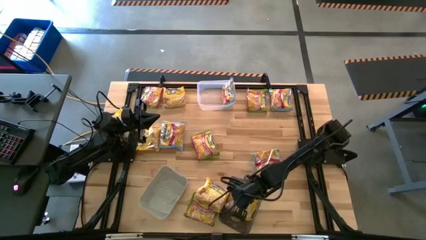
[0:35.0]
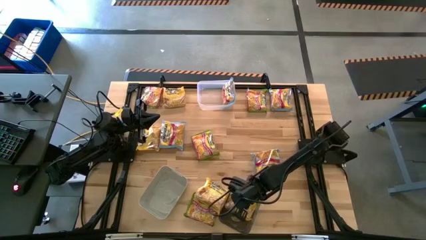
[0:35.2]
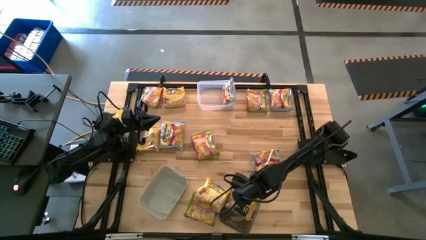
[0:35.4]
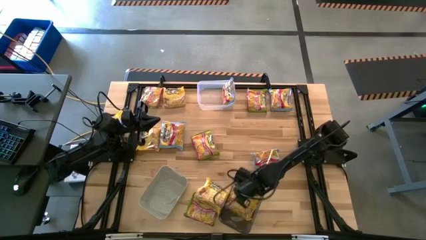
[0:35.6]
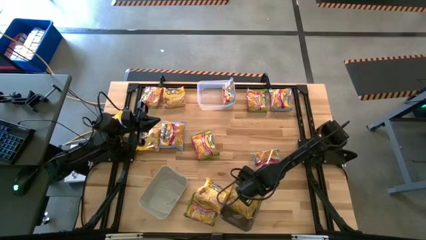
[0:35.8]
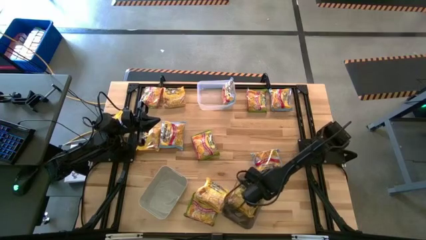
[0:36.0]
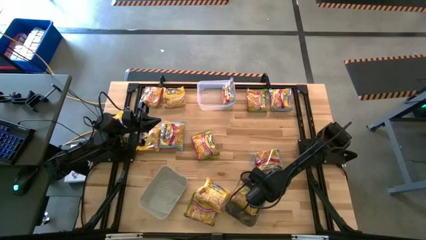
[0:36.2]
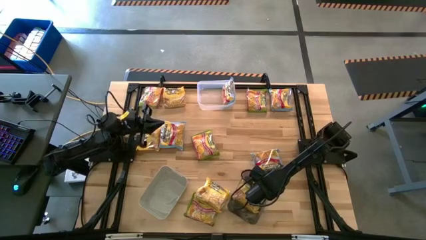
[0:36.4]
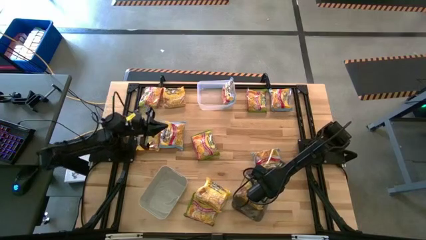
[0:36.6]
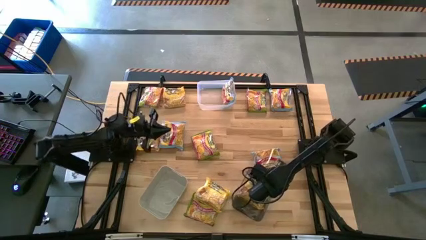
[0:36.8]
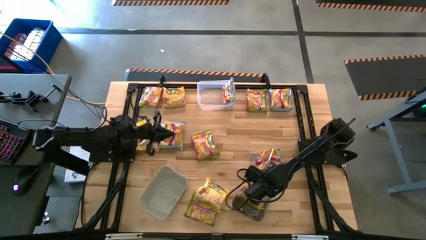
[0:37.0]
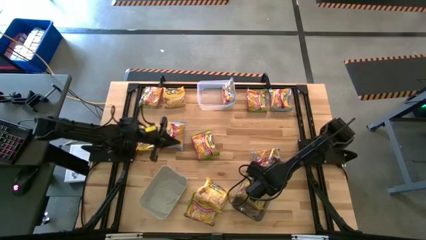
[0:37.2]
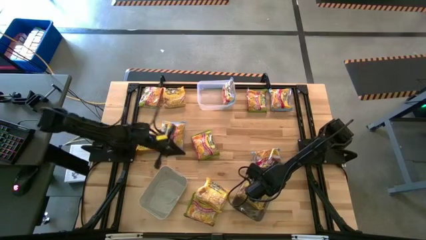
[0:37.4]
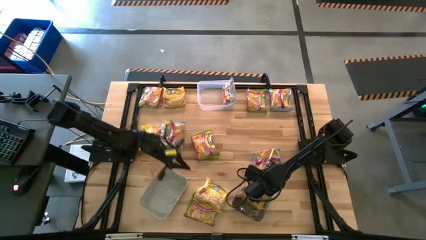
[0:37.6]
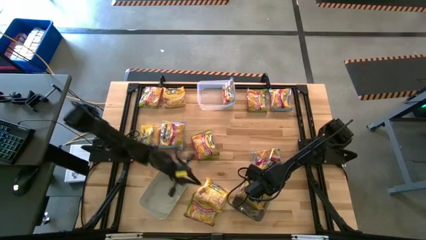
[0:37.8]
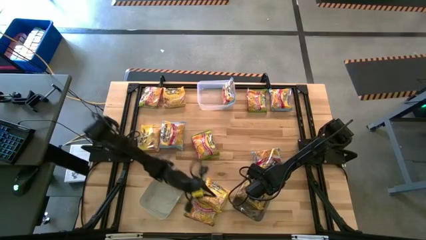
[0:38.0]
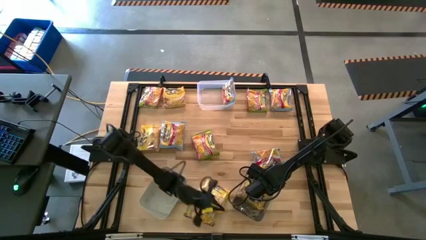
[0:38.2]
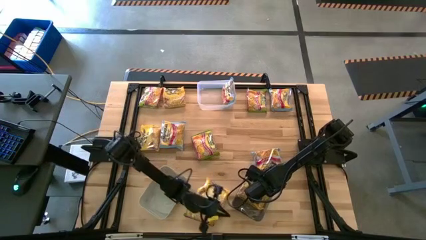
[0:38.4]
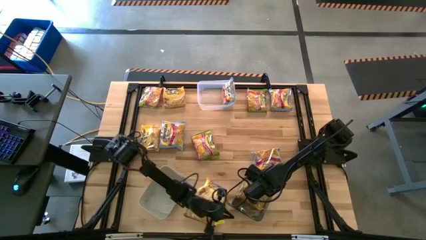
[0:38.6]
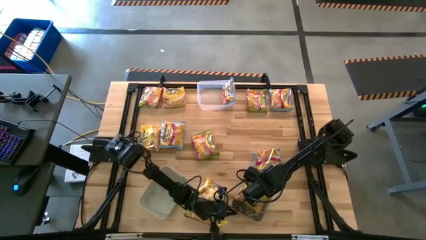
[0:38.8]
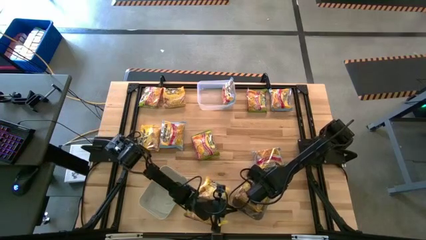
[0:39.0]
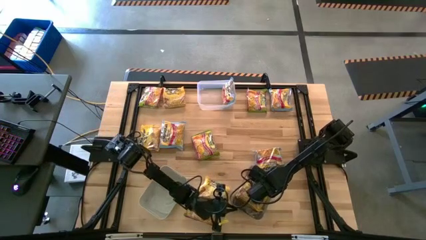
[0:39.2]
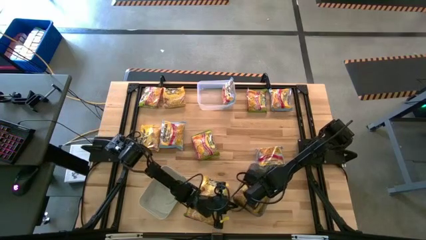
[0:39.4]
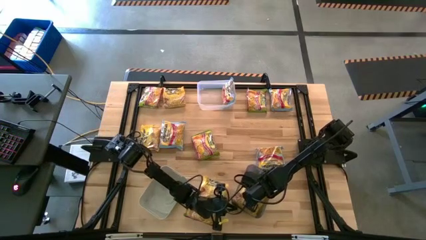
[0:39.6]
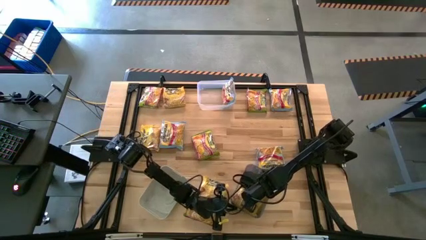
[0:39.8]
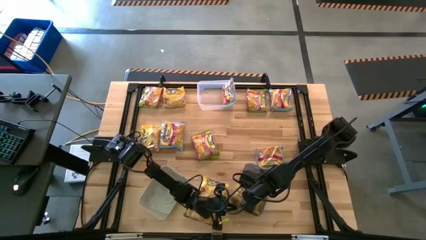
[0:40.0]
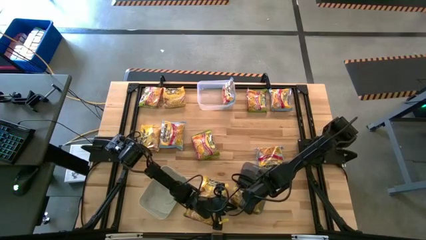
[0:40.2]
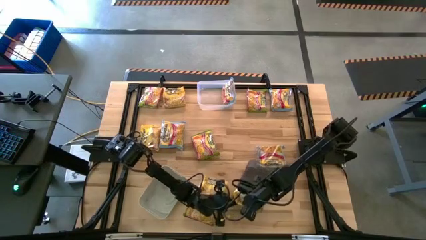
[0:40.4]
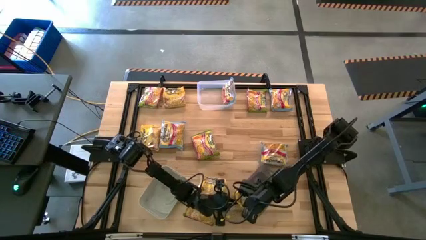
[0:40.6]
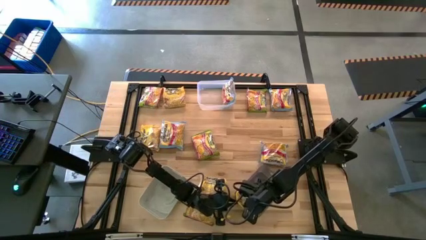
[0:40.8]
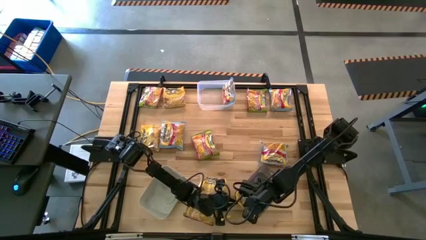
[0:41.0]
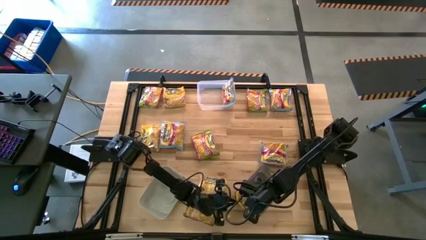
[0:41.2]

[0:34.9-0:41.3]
Task: Sort Maruchan noodles
Adjust the yellow noodle pack in the black bin

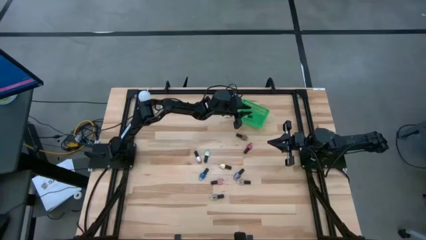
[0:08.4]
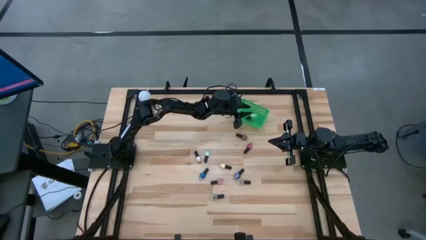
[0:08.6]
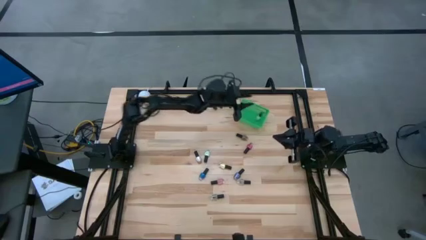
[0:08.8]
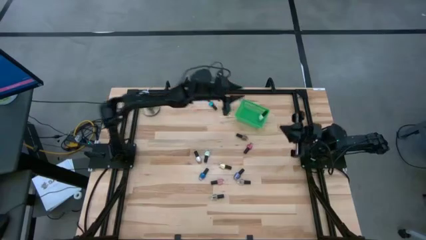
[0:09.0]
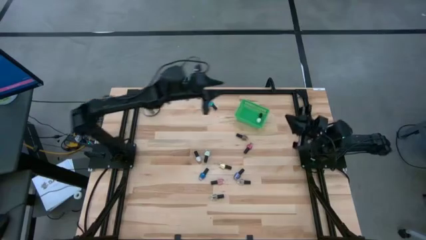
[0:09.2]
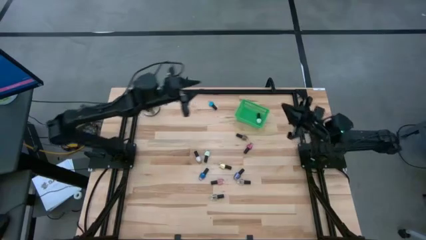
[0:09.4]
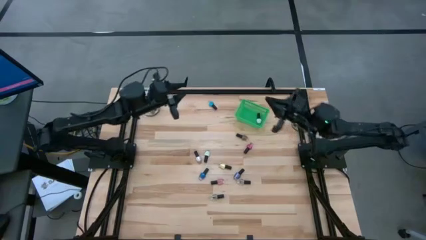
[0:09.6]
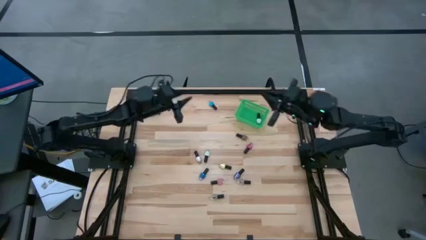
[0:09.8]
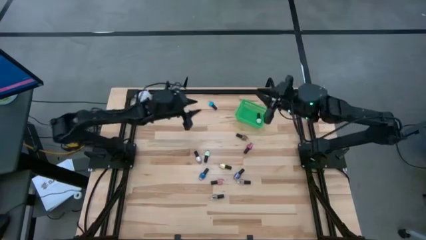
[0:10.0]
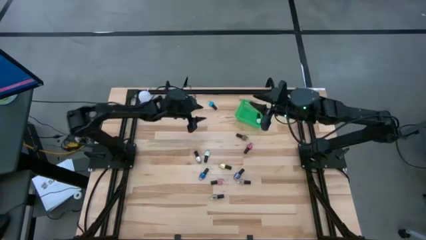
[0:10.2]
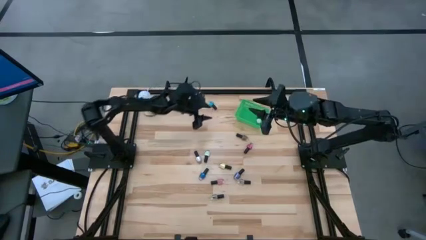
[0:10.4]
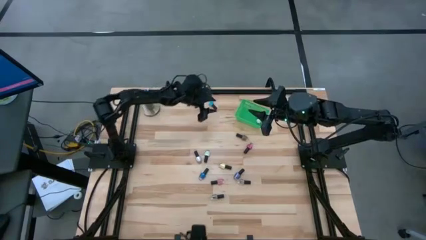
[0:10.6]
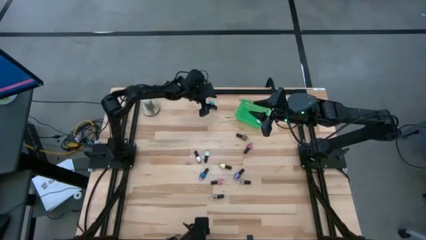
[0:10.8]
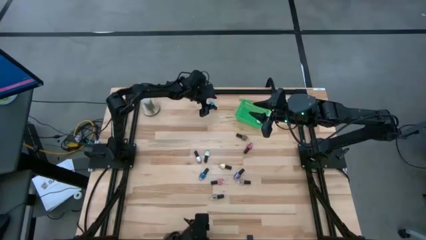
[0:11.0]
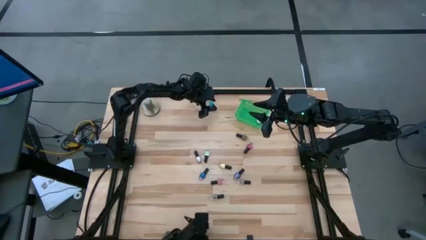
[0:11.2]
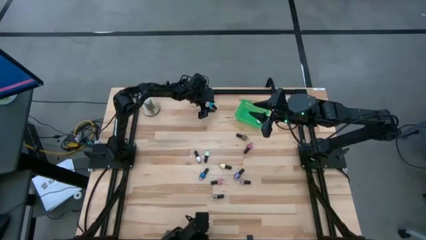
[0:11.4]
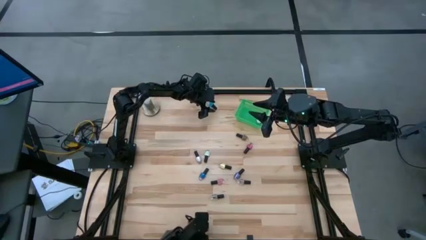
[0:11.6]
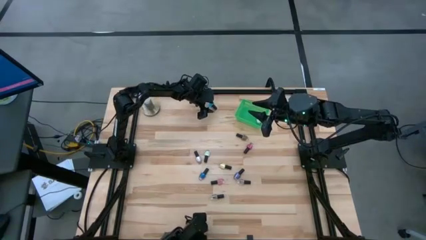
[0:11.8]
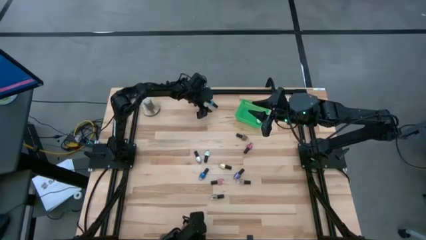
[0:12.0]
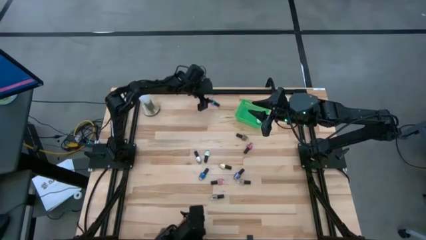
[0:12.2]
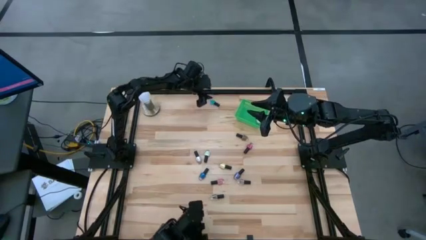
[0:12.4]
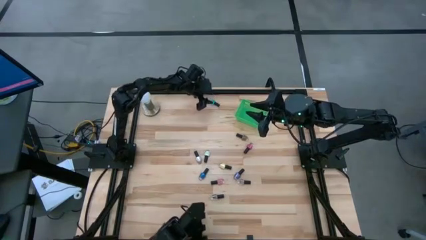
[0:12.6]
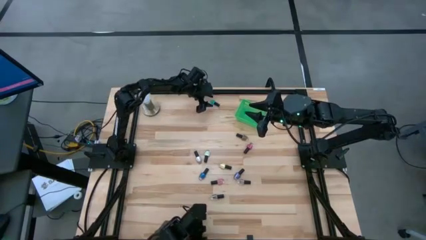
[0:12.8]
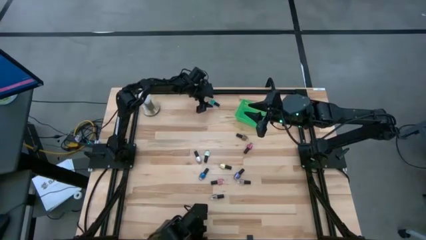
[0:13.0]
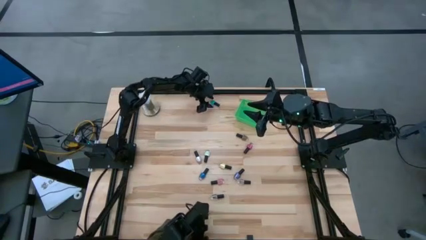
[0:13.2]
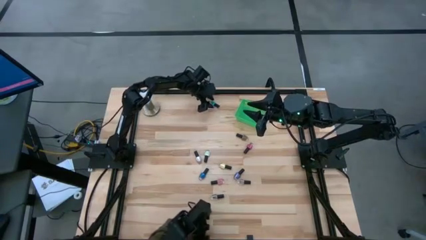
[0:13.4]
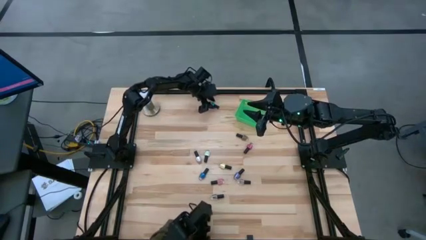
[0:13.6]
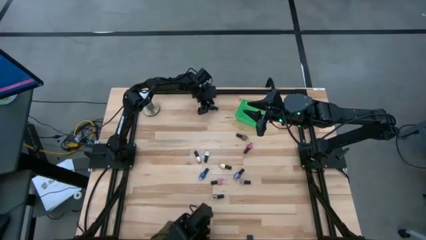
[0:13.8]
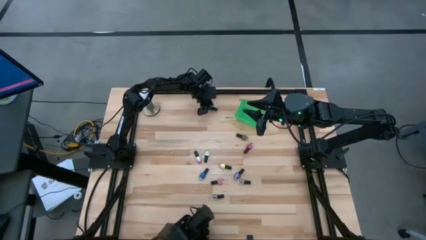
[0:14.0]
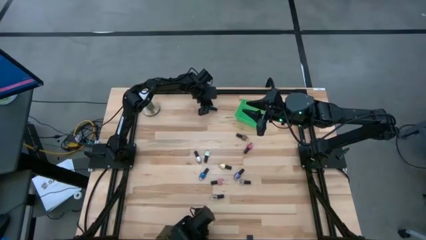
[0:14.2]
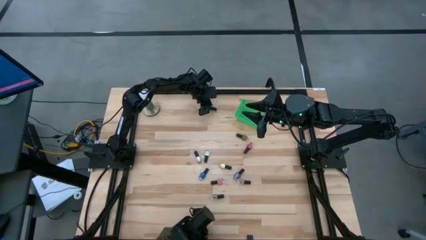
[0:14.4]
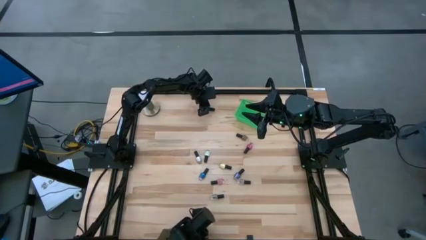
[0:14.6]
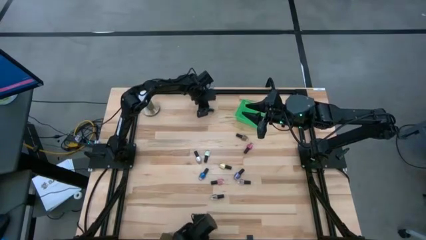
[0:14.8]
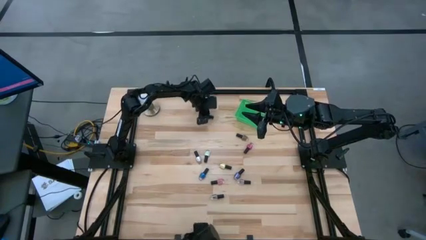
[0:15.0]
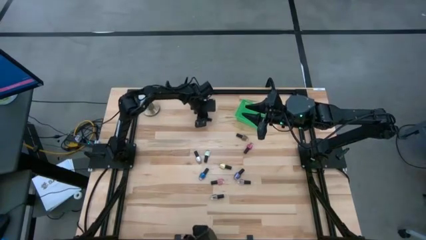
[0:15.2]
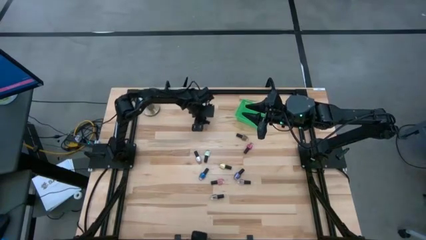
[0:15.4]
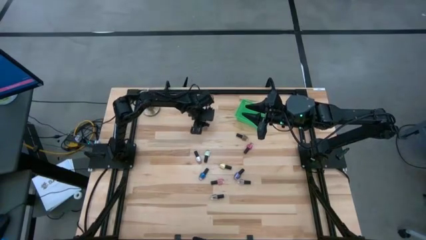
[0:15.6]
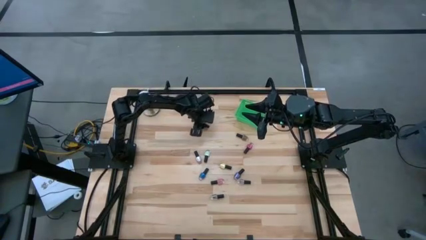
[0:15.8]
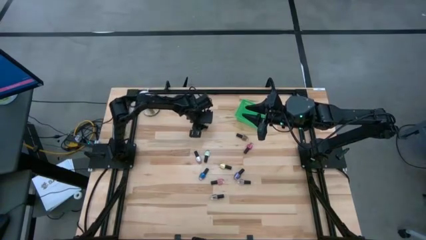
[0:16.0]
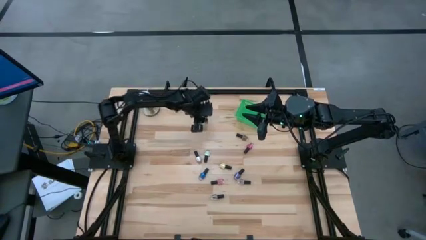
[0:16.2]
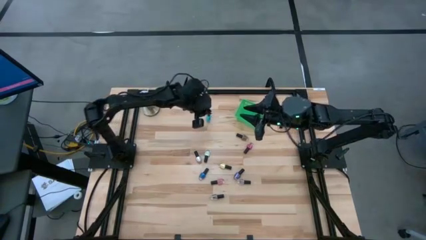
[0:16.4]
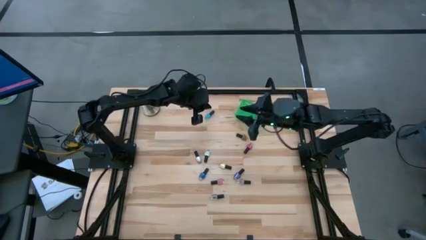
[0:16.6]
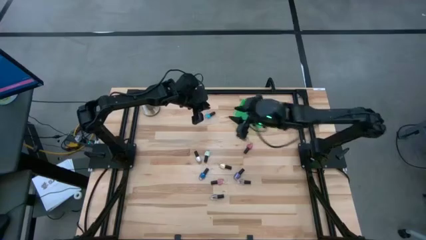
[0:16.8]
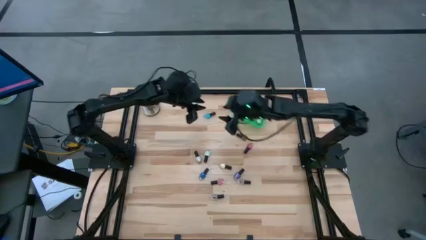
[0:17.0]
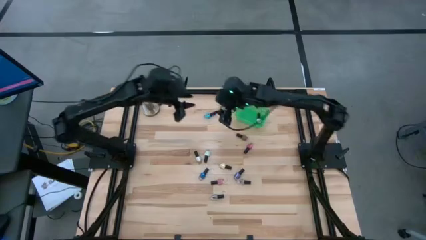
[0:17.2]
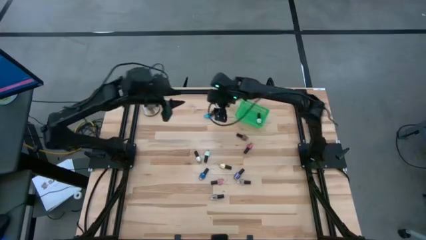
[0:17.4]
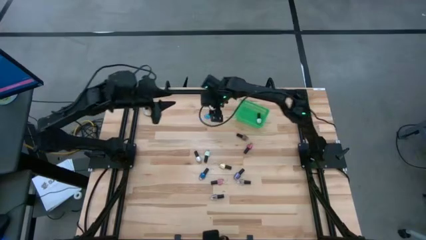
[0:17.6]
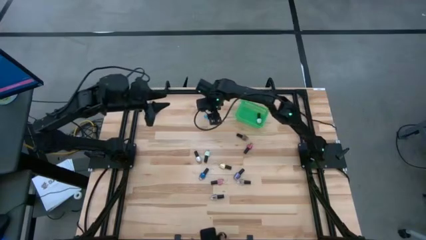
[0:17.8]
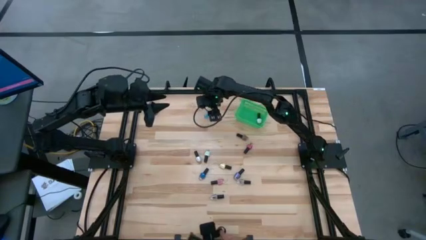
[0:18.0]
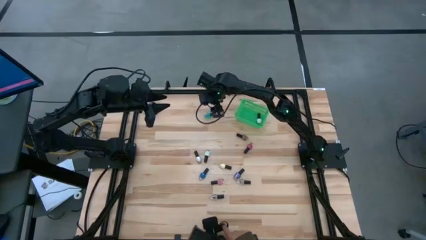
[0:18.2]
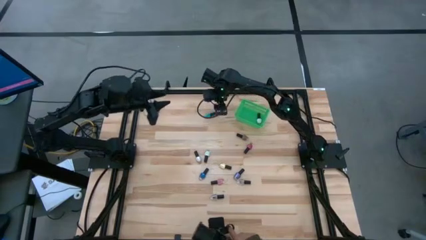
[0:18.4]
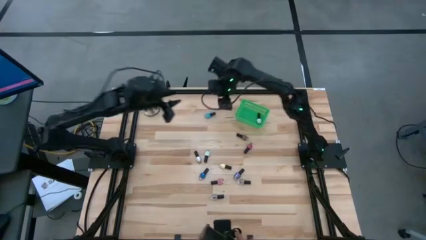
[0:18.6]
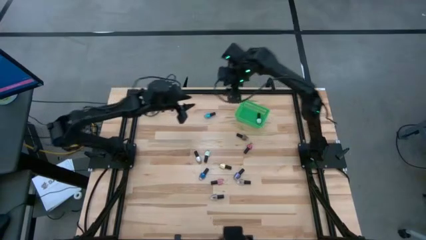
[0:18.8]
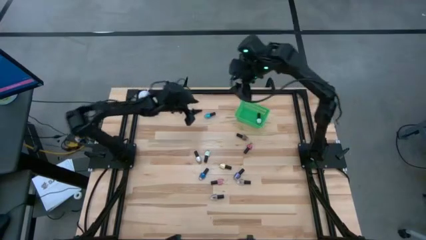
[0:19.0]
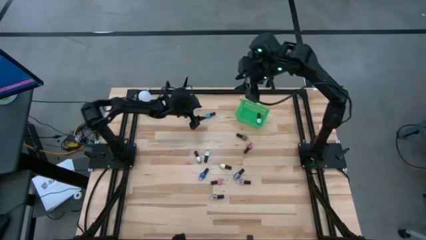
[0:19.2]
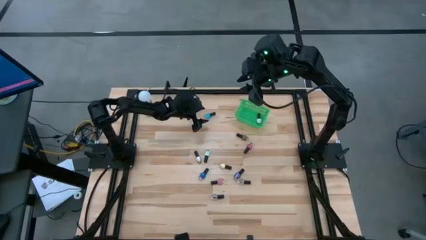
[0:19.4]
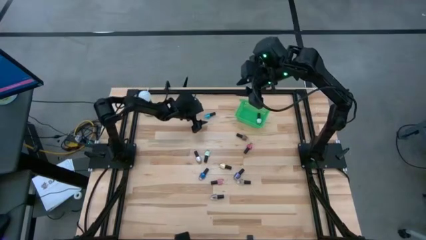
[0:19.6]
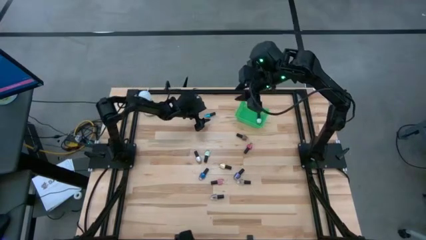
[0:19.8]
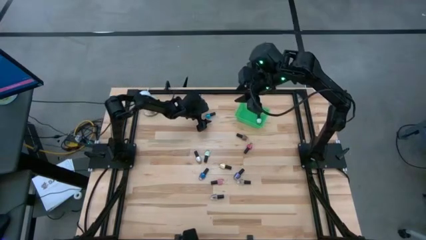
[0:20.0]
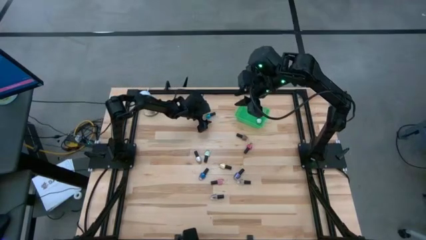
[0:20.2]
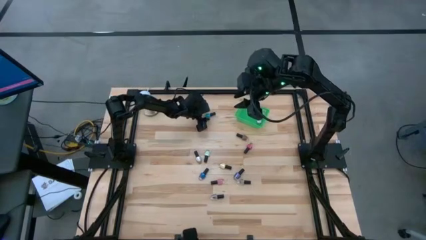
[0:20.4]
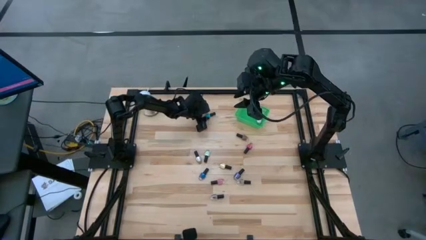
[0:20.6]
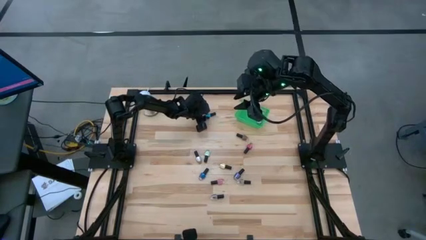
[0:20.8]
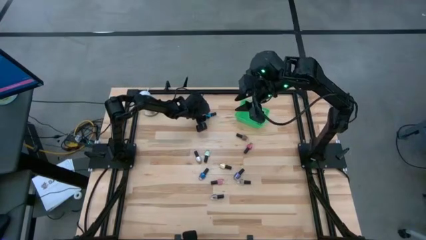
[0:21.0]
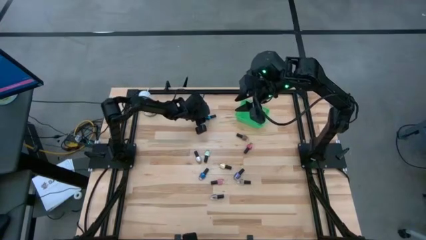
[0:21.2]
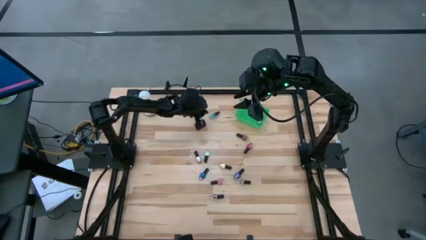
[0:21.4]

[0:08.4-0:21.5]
Task: Pick & Place Nail Polish
Put the light blue nail polish into the green bin
